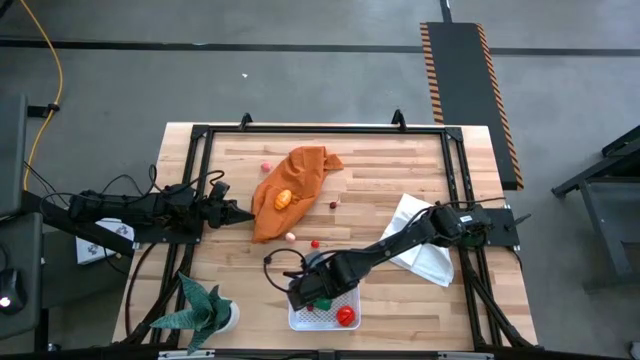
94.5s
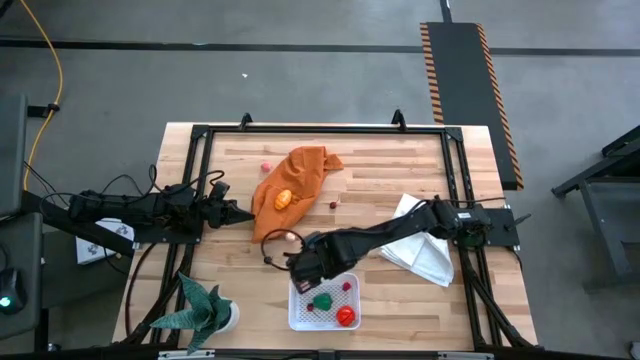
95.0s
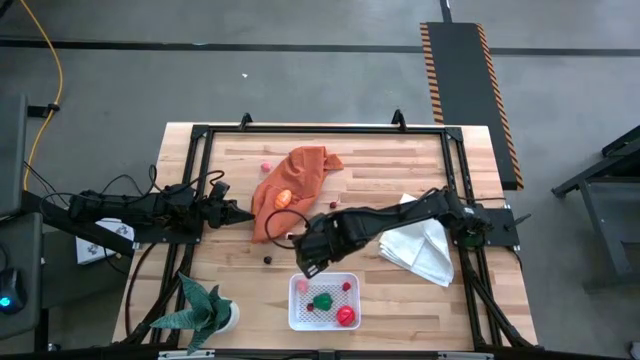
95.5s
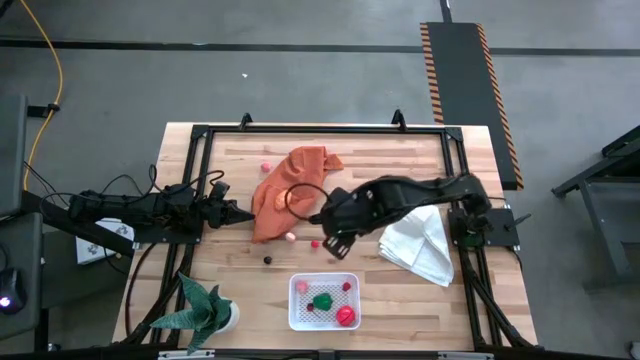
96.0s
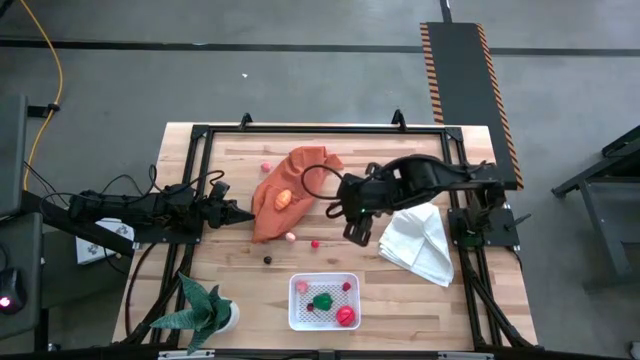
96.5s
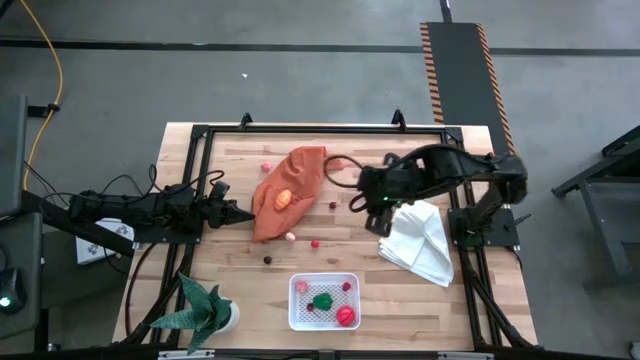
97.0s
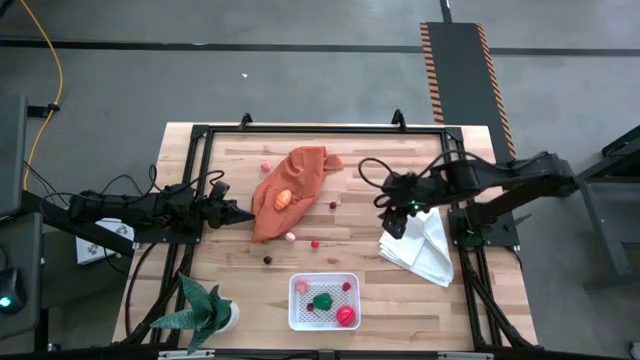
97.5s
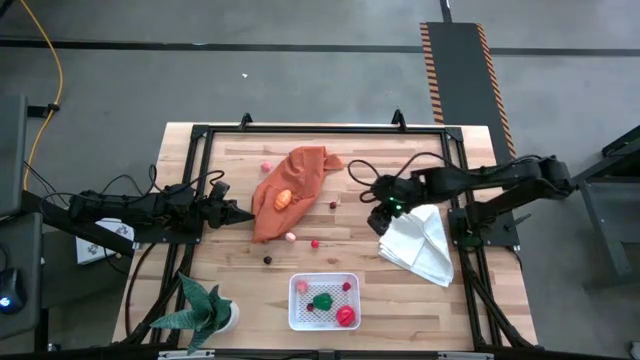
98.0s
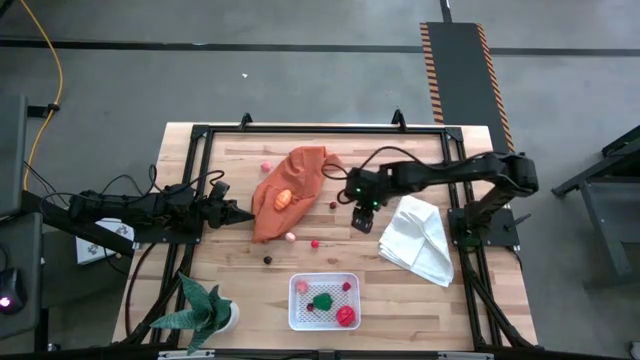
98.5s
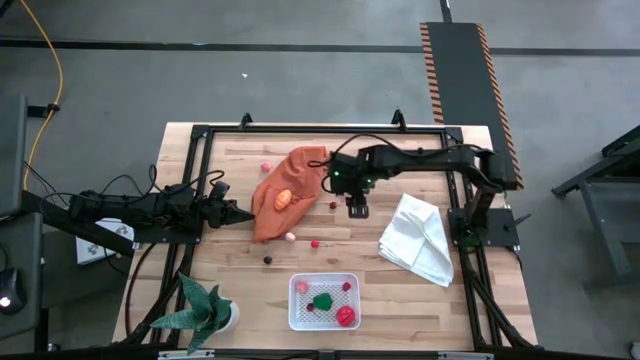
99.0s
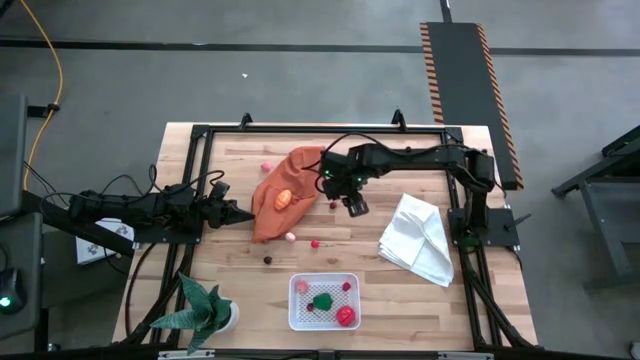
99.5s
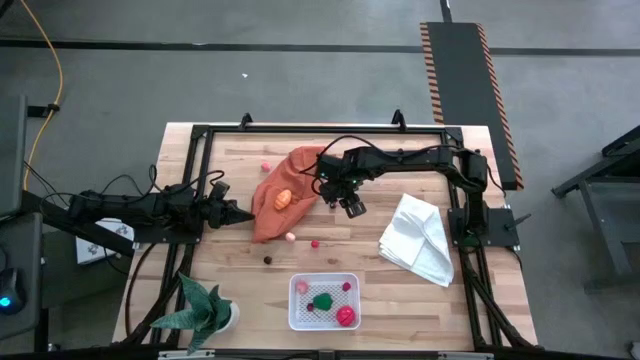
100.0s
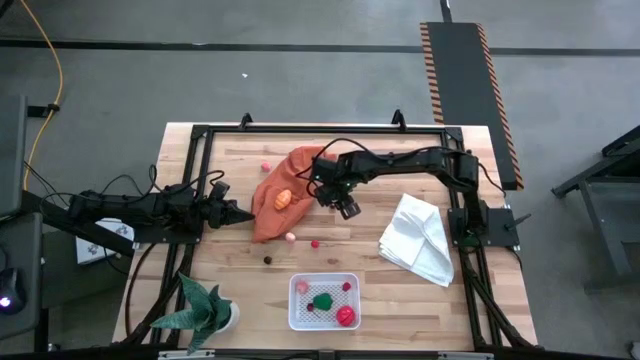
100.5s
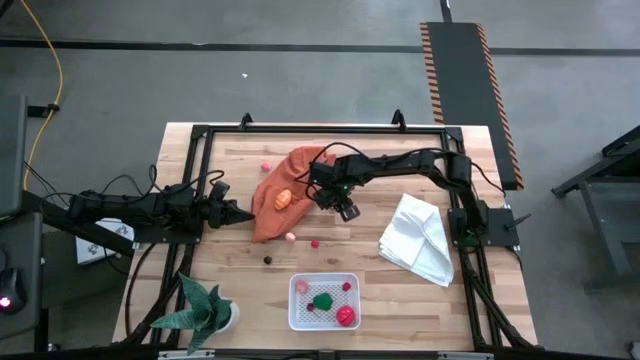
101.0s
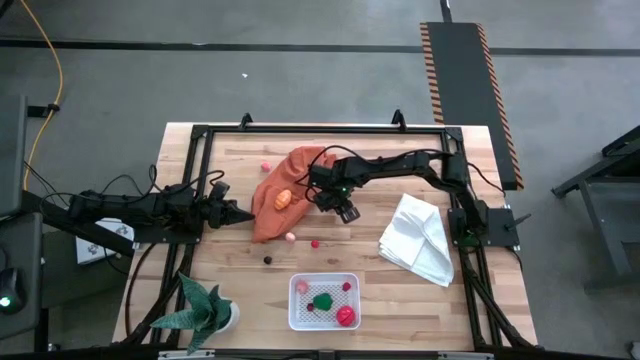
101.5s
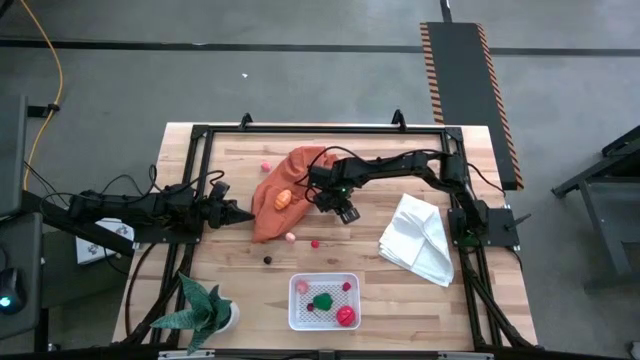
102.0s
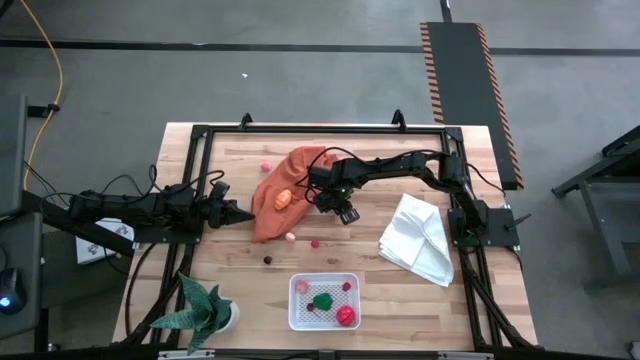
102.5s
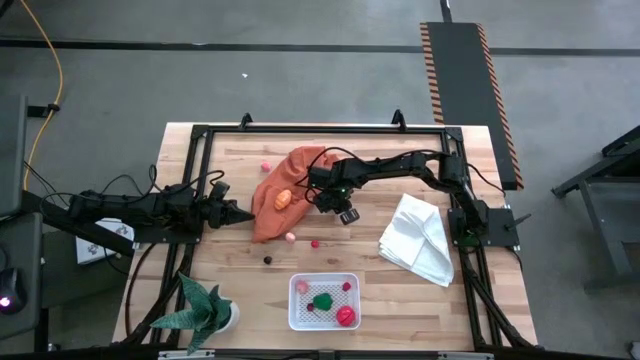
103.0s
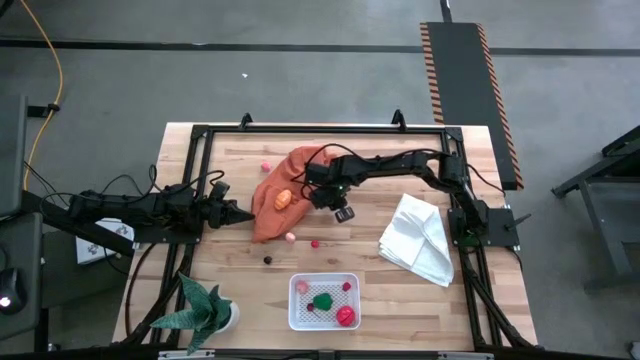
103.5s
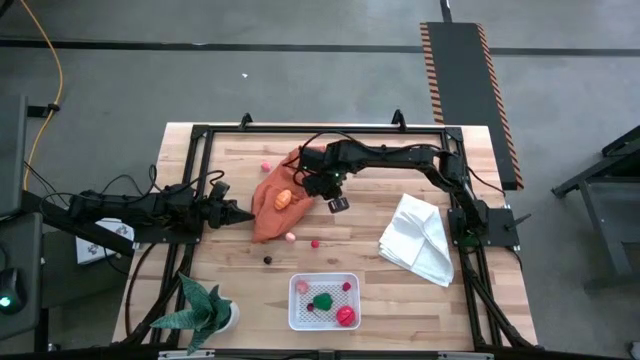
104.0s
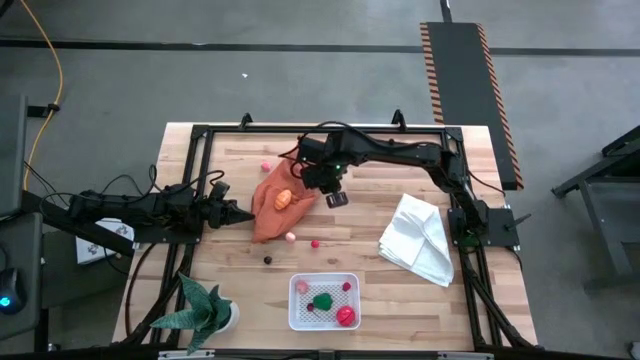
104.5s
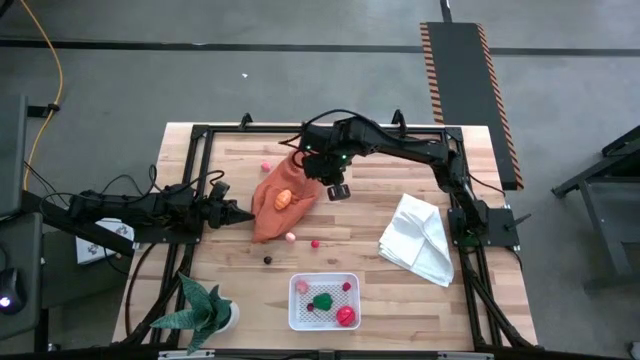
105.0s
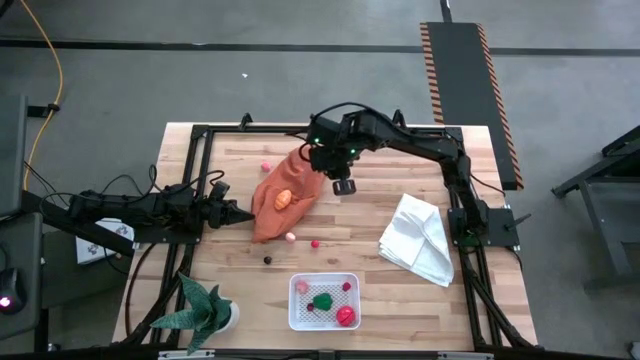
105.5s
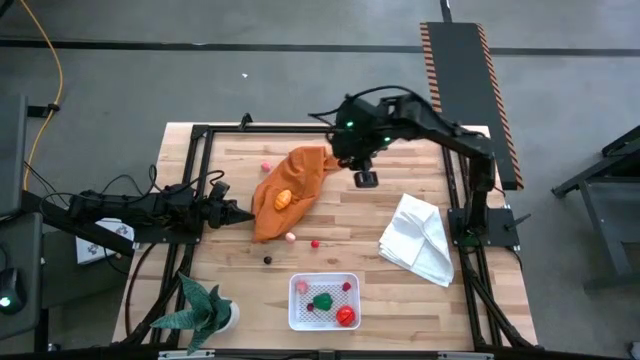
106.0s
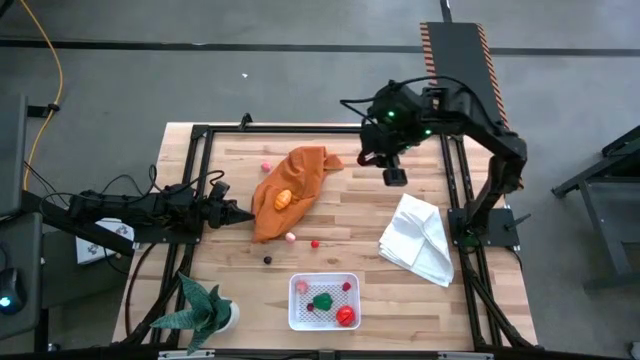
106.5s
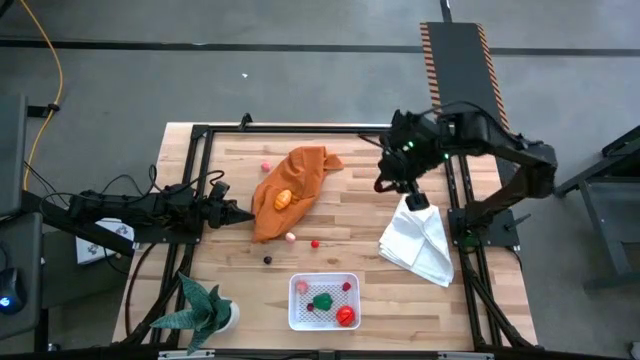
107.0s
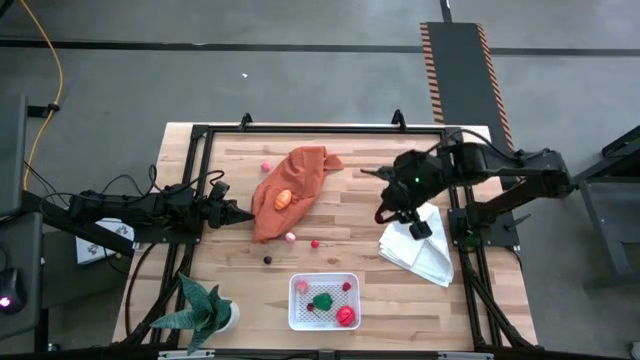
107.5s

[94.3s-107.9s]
Task: Pick and placing Produce into tupperware
Put the top red cherry into the white bin

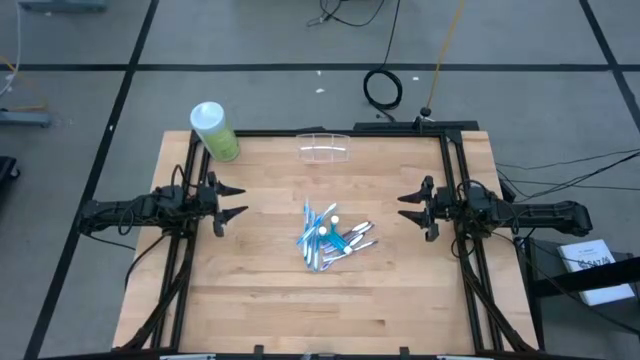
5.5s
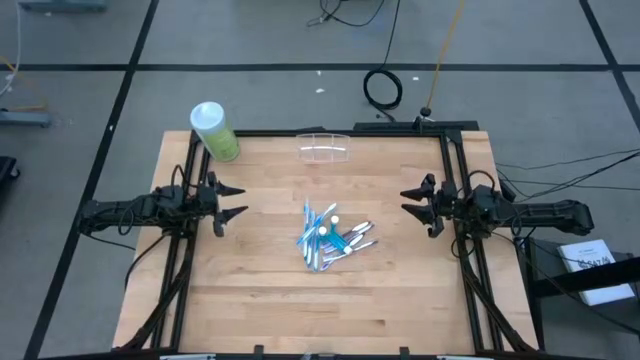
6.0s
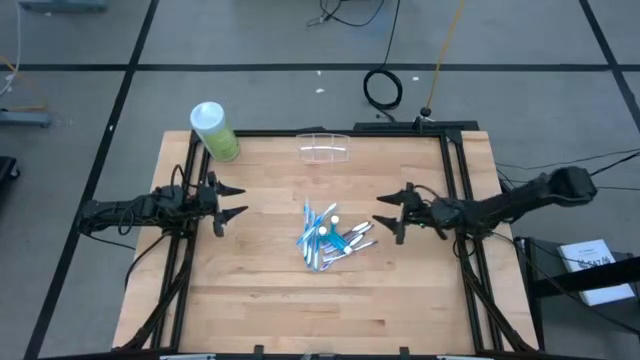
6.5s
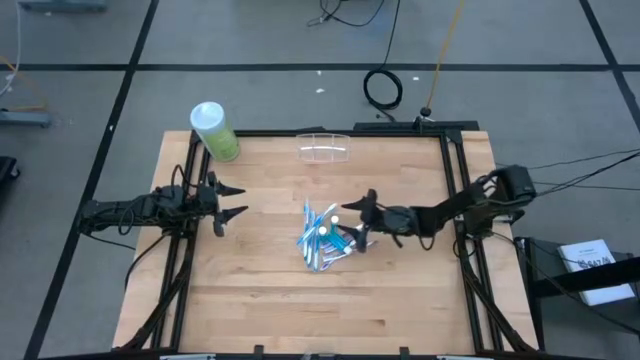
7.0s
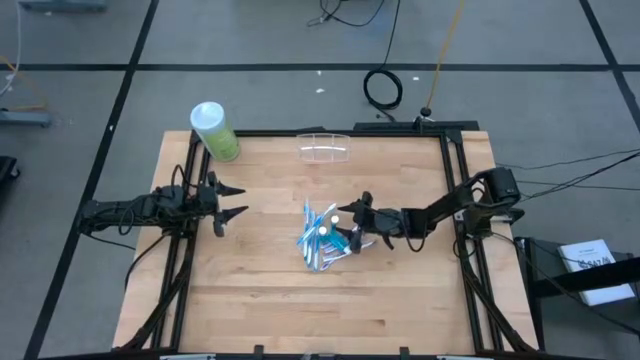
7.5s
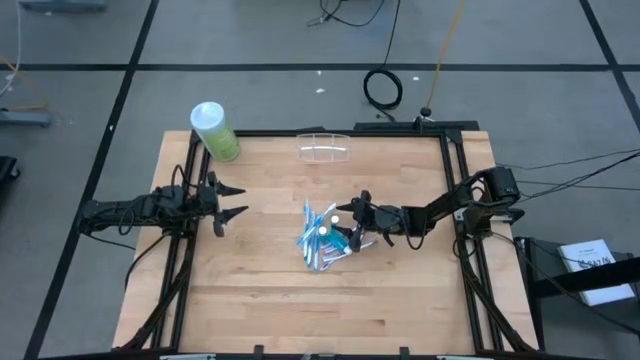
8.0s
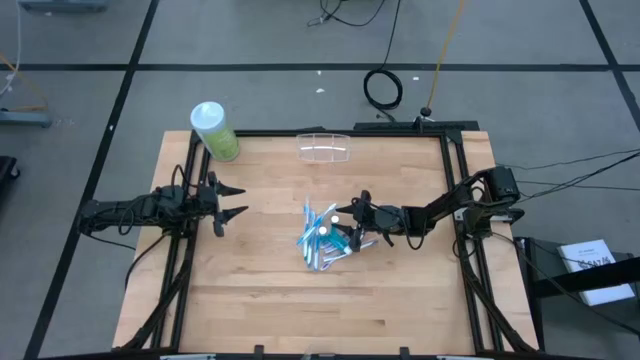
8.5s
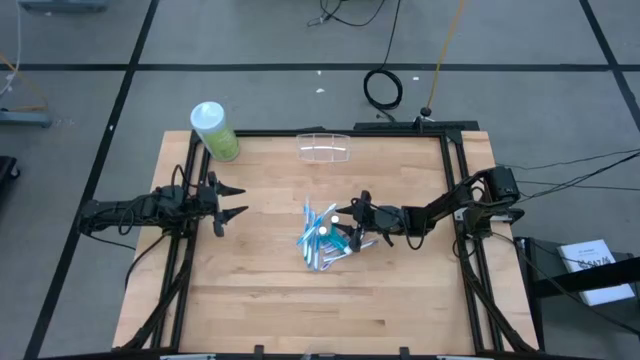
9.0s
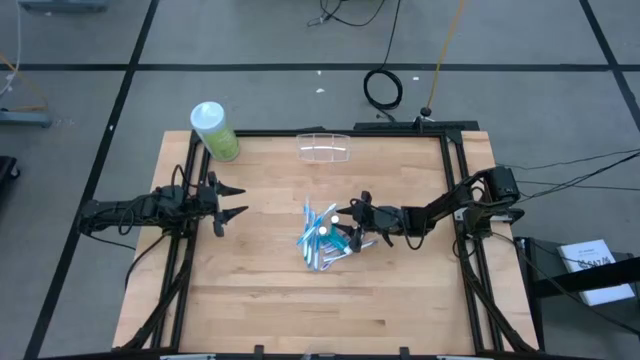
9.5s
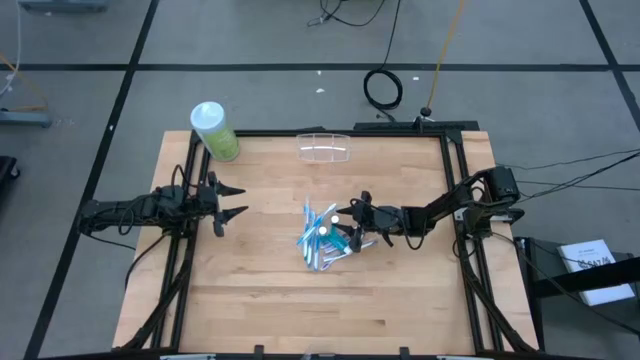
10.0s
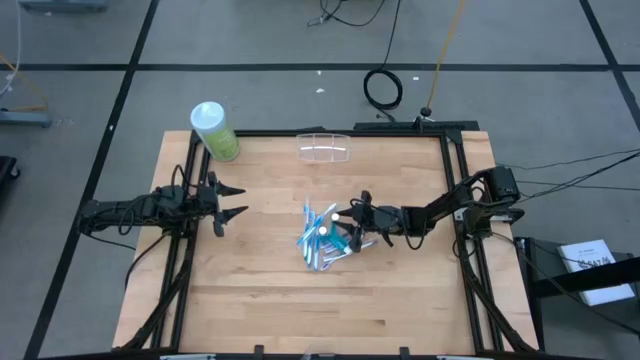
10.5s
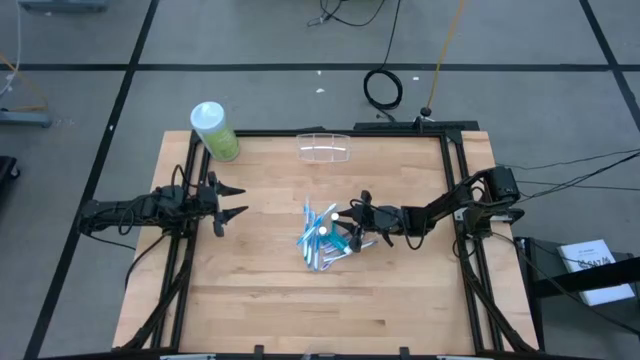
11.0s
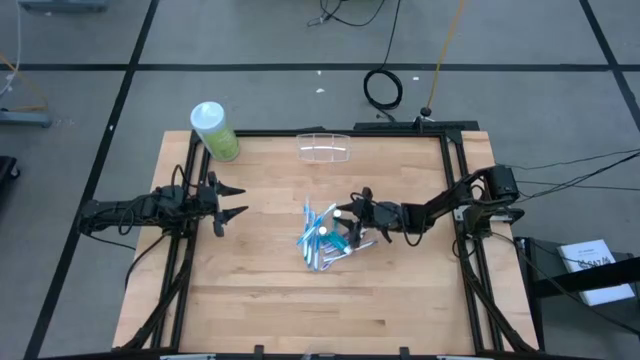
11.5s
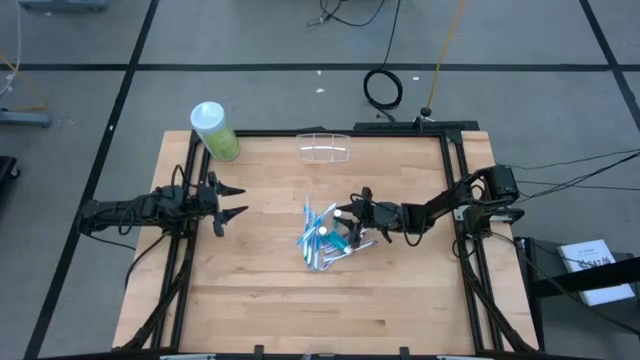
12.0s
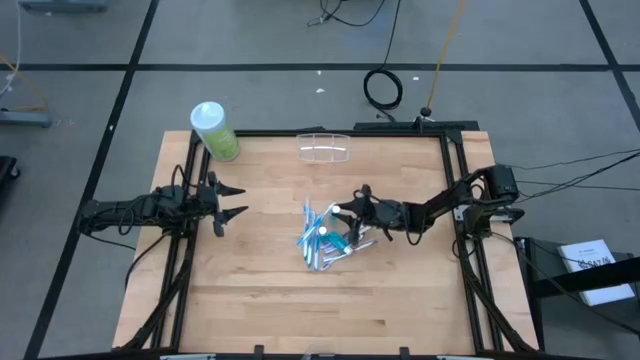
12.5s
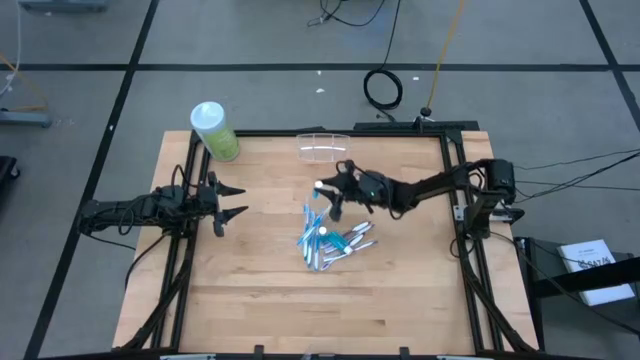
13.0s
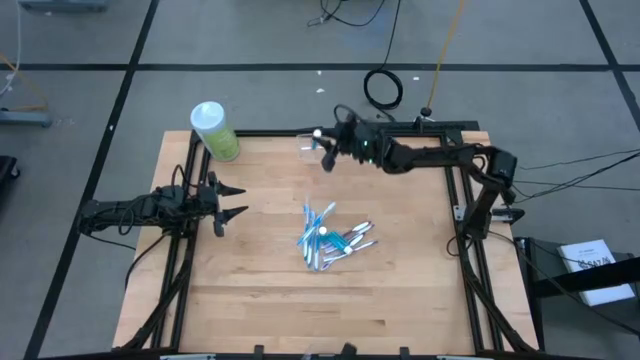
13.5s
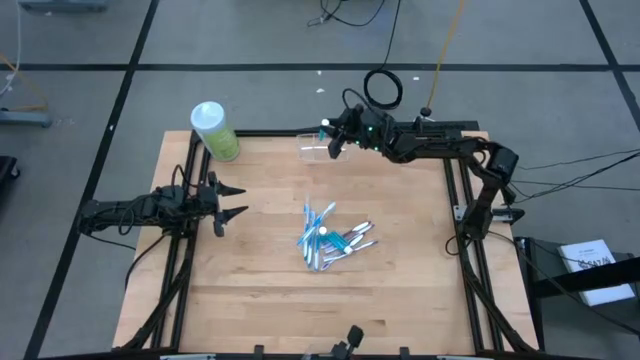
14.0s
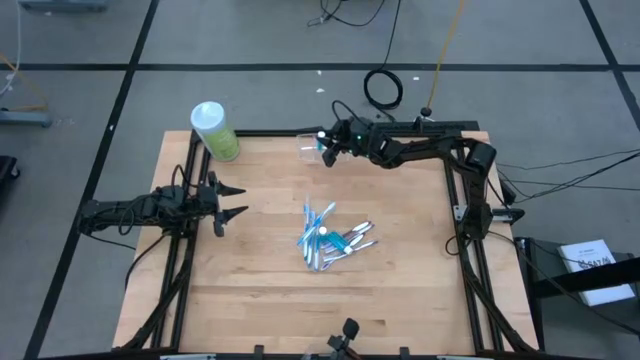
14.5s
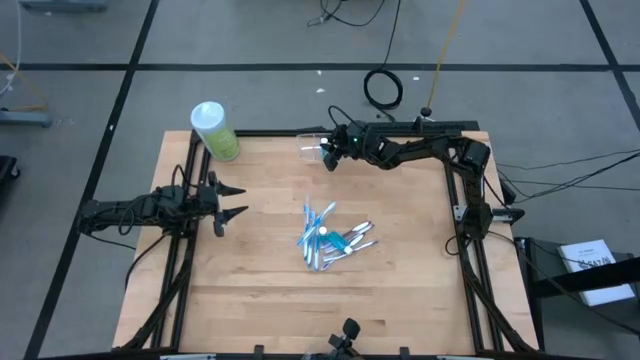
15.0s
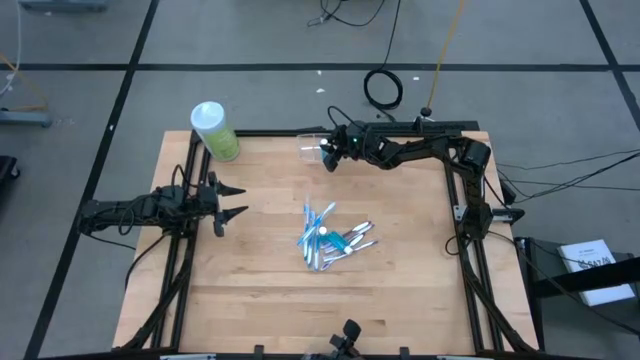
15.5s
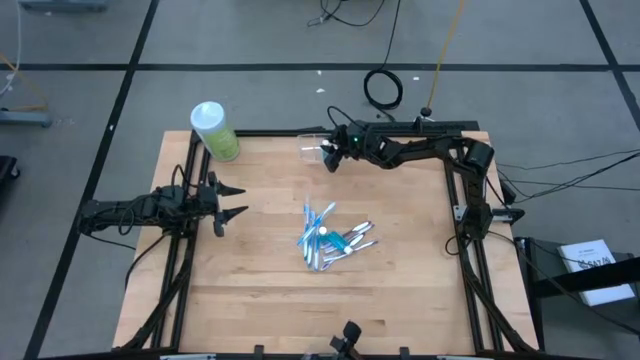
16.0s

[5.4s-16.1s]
Task: Pick & Place toothbrushing station
Put the mouthwash into the transparent organizer
